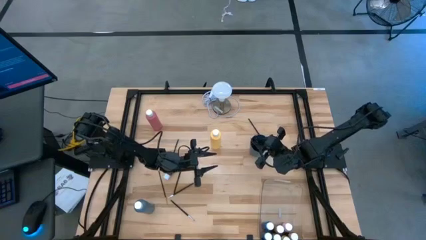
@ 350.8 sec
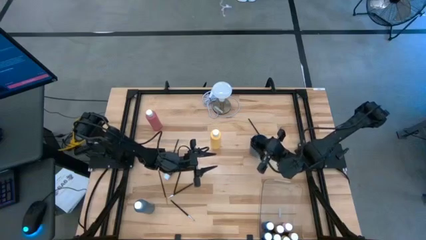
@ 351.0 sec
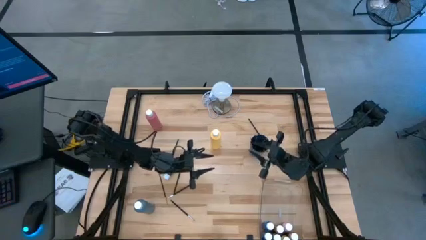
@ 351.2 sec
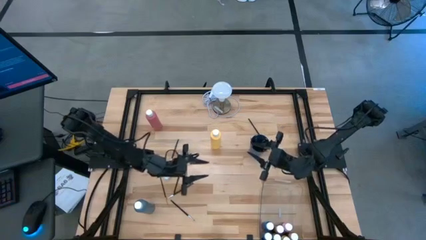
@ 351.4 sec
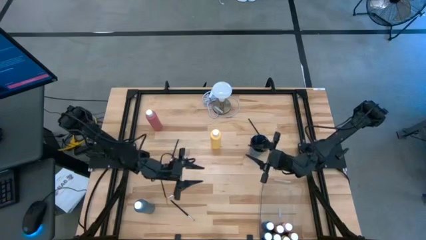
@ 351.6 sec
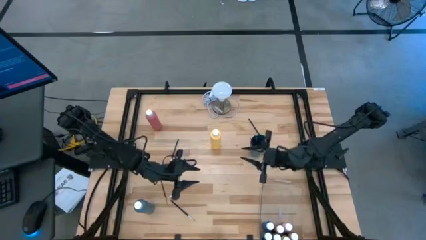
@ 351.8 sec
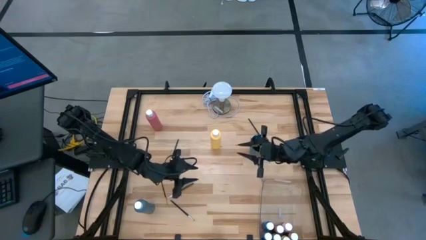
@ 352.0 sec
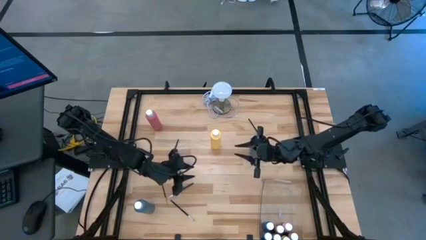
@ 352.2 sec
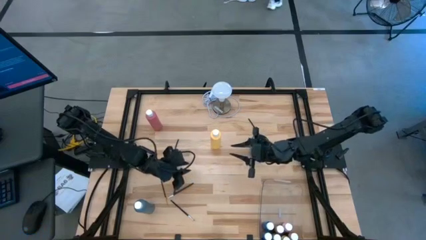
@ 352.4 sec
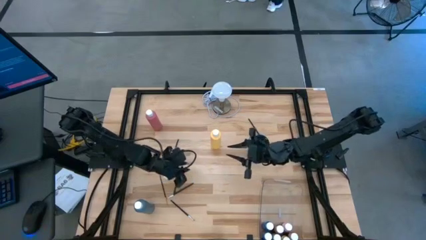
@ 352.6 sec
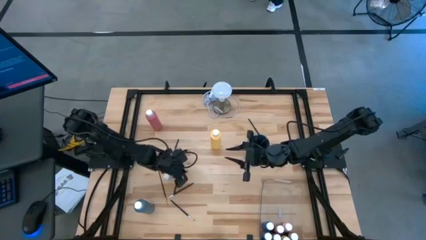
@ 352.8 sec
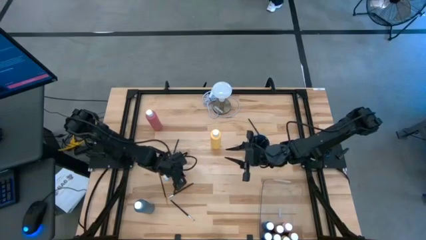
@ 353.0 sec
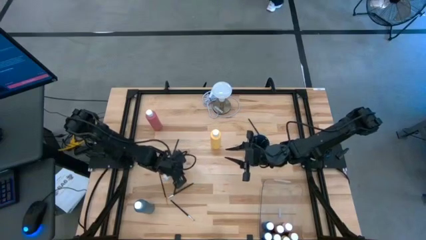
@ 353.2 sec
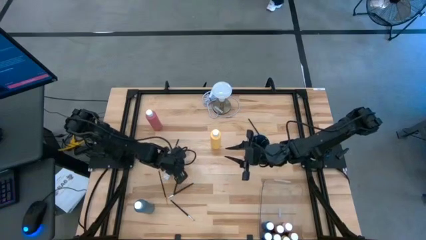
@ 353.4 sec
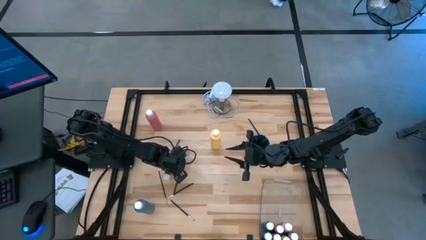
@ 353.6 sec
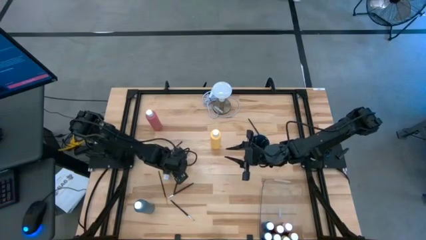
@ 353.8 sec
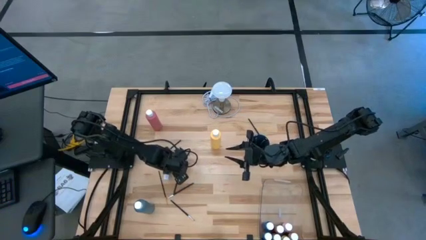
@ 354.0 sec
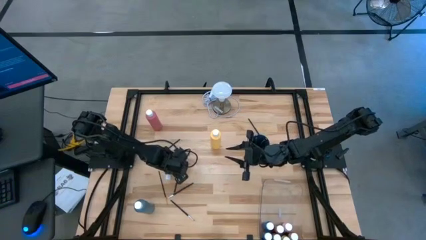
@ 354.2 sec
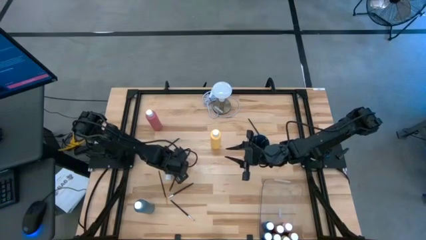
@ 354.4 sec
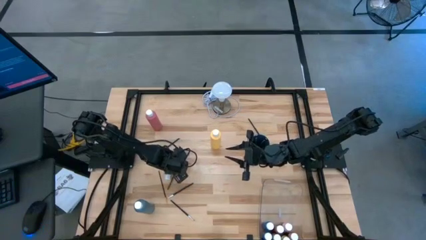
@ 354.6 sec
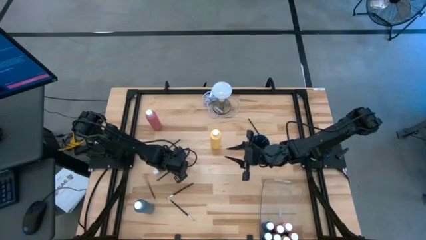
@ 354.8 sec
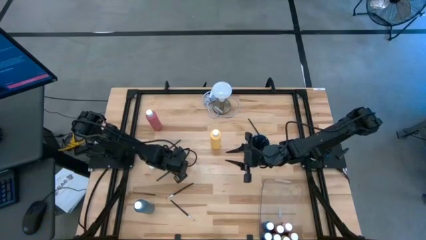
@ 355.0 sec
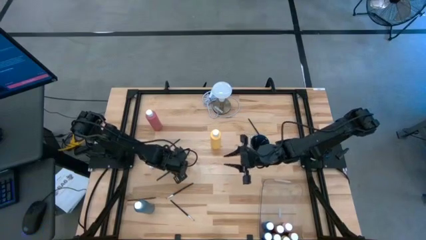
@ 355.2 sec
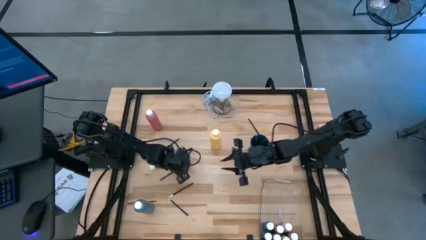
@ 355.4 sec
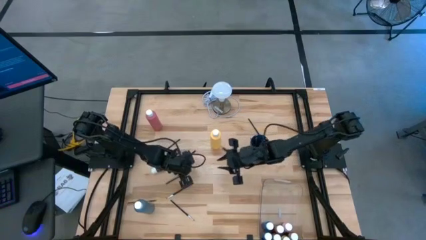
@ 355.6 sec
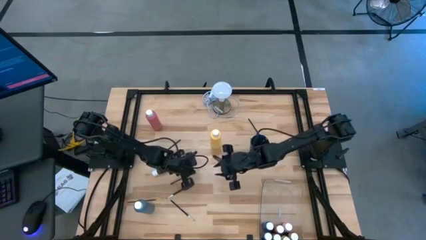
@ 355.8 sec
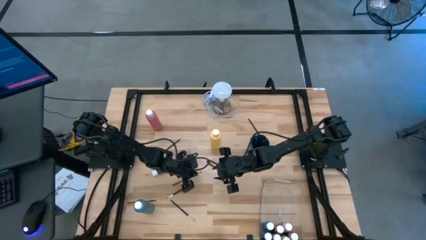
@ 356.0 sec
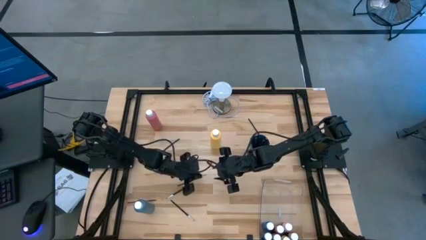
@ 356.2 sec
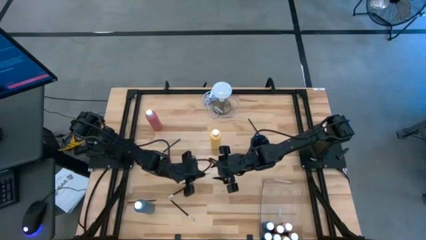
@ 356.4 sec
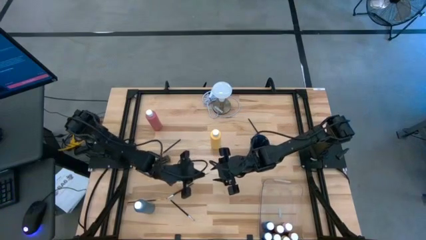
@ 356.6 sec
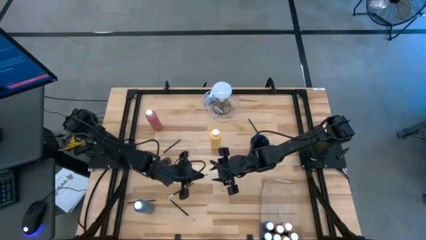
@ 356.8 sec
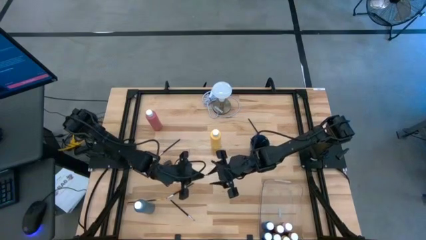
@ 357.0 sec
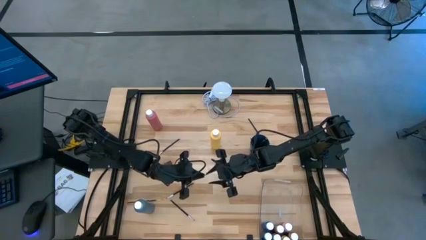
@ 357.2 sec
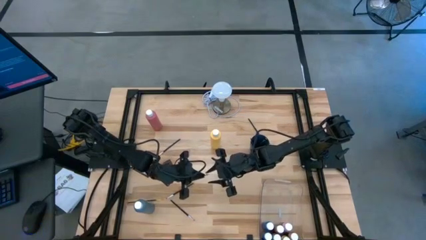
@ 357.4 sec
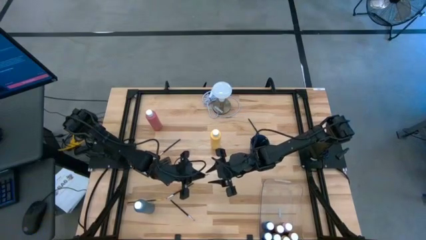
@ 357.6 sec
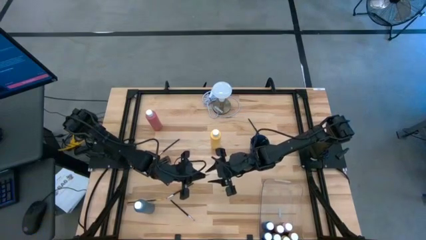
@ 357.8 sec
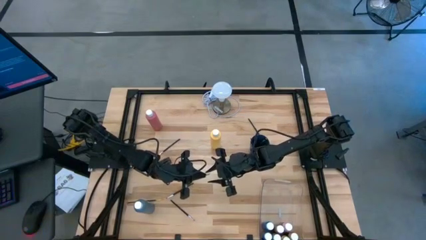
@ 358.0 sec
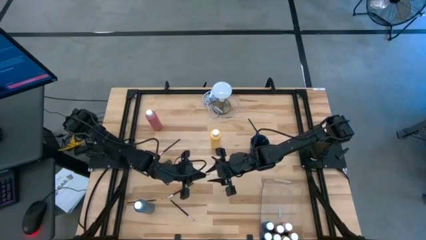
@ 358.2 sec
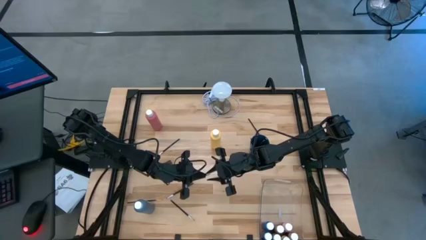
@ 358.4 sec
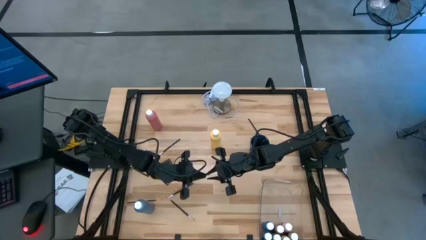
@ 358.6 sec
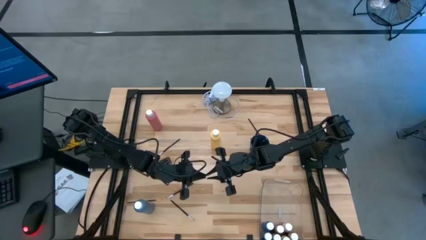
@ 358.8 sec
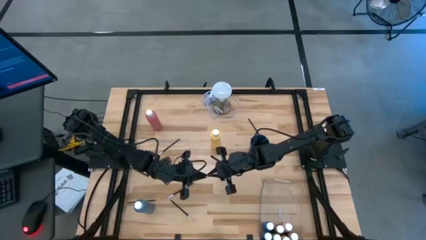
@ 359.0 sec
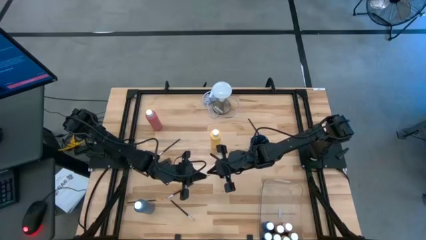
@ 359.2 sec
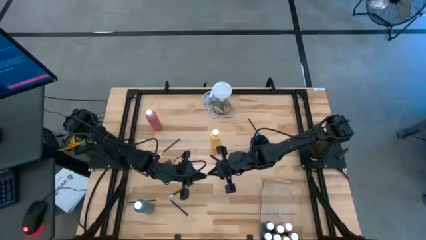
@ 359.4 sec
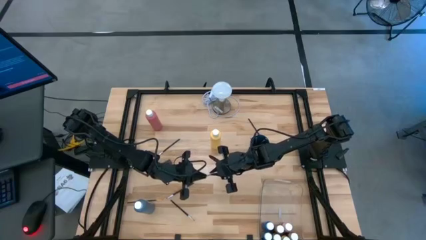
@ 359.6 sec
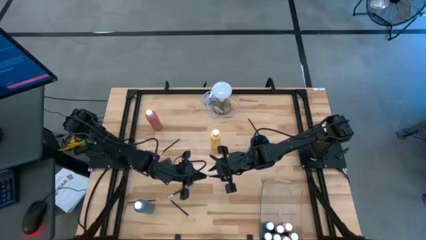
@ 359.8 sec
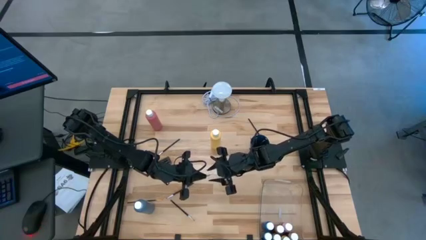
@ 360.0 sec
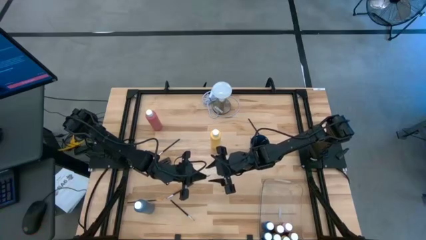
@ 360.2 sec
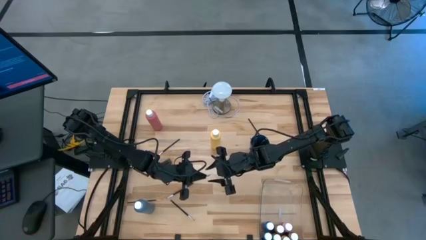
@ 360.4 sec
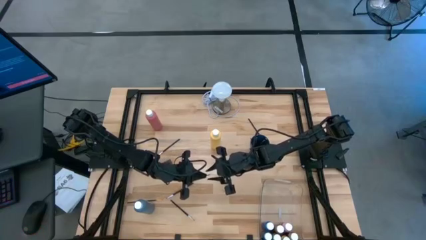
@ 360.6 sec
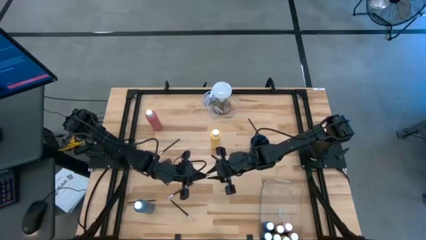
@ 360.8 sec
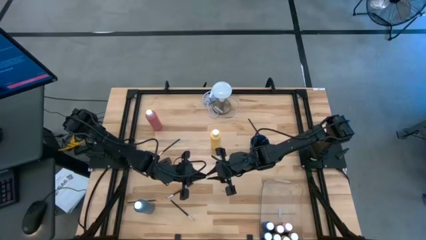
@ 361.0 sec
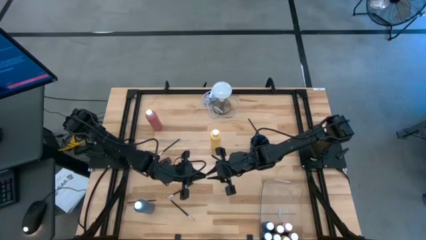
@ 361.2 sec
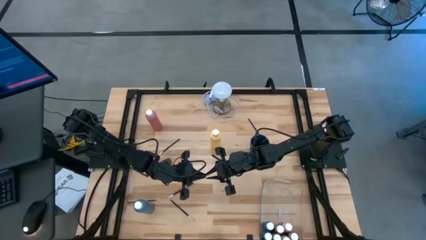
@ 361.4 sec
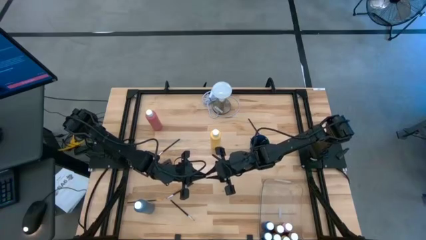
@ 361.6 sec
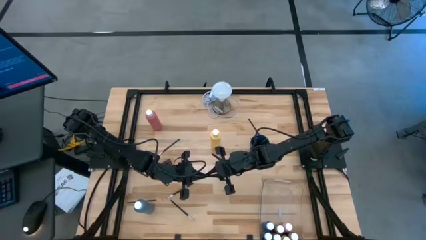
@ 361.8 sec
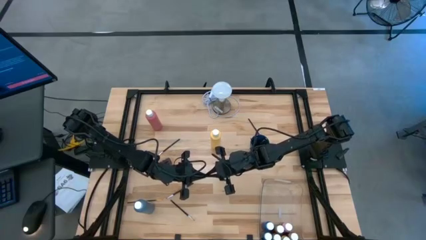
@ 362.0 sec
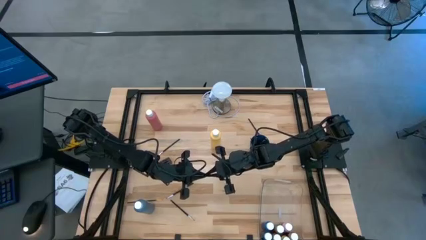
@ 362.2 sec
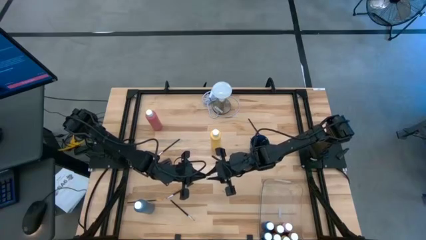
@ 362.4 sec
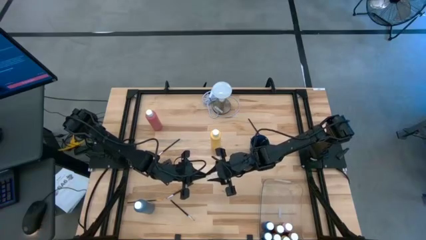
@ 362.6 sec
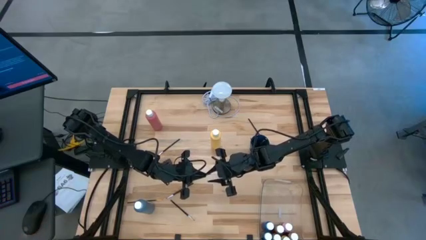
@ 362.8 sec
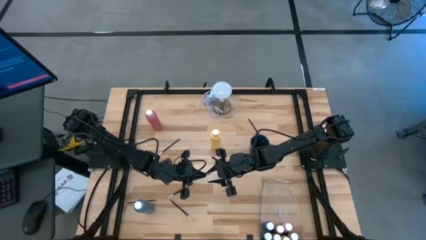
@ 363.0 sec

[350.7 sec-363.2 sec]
Task: Pick & Place Paint Supplies
Put the black silver paintbrush into the blue cup
